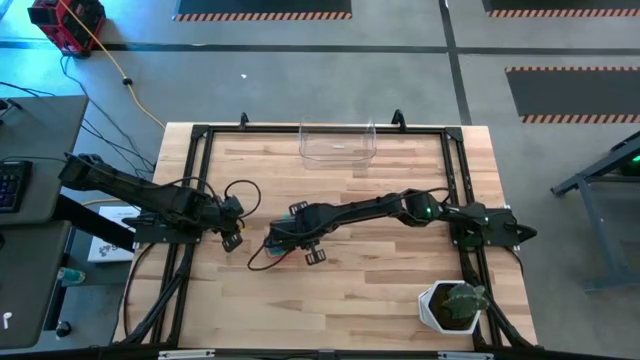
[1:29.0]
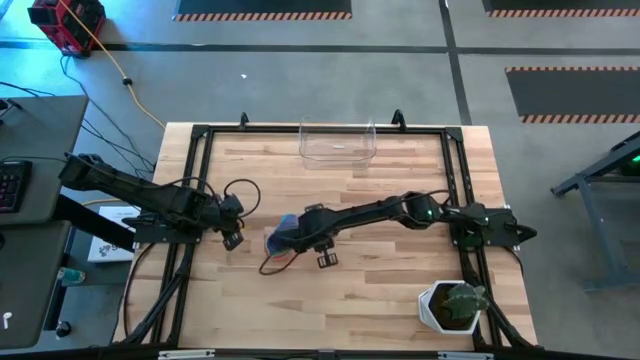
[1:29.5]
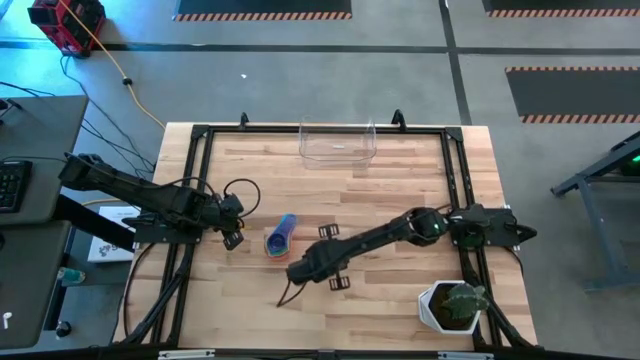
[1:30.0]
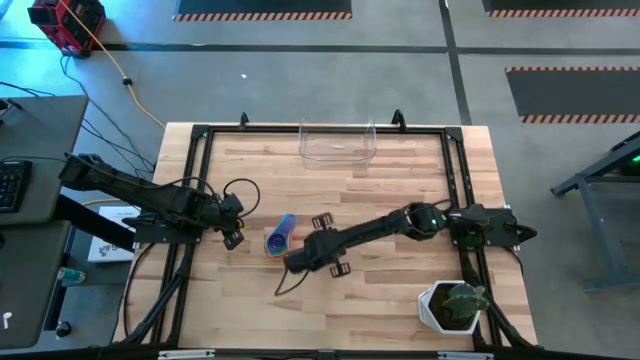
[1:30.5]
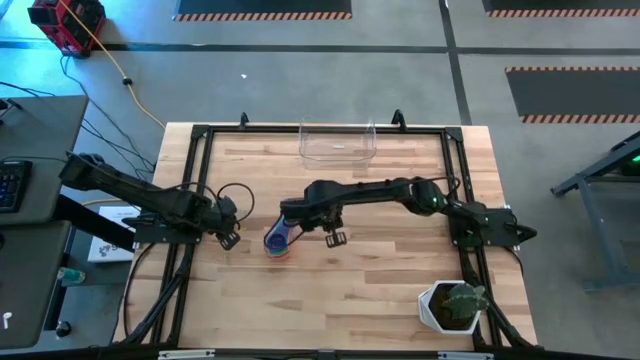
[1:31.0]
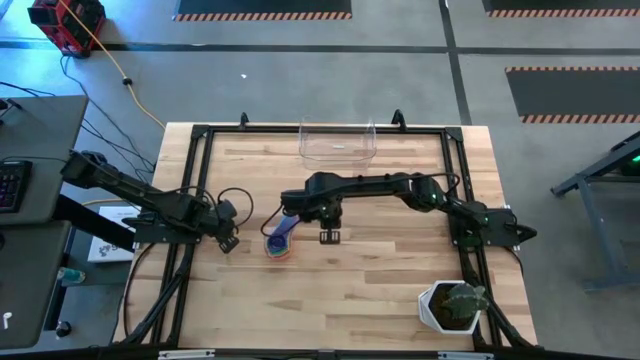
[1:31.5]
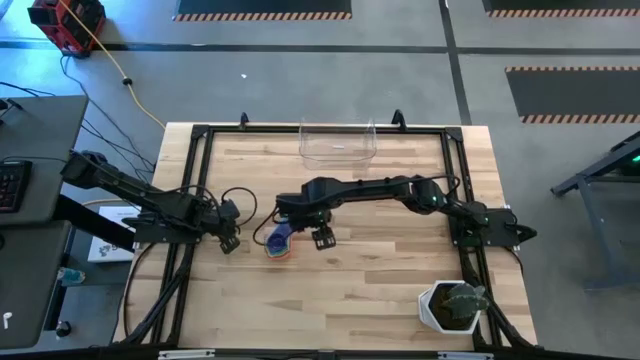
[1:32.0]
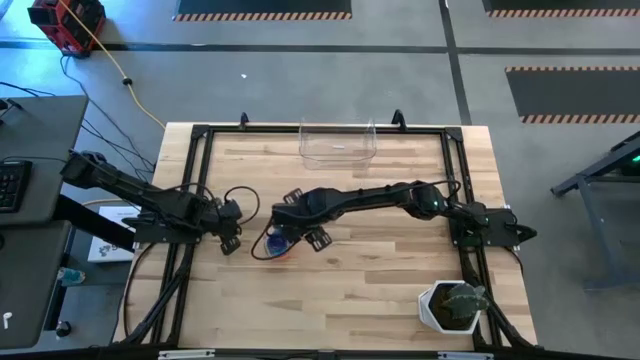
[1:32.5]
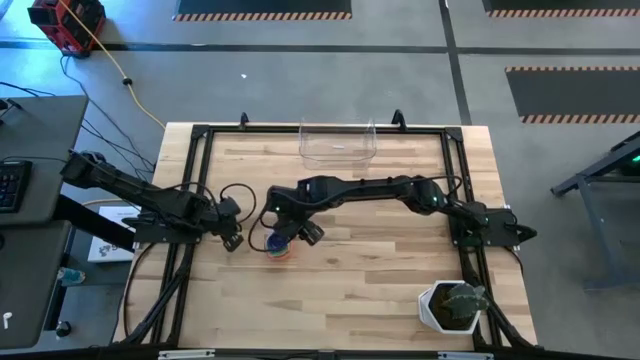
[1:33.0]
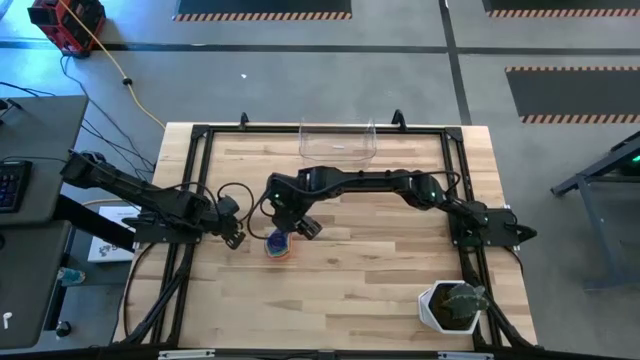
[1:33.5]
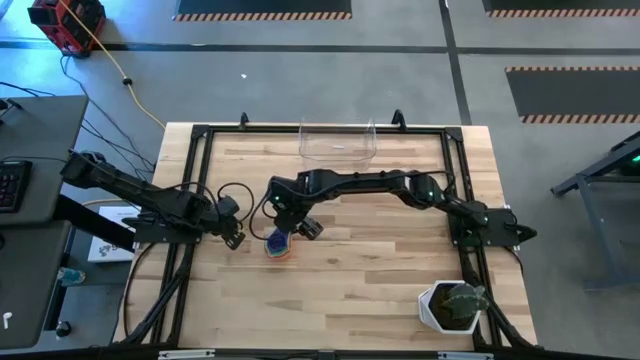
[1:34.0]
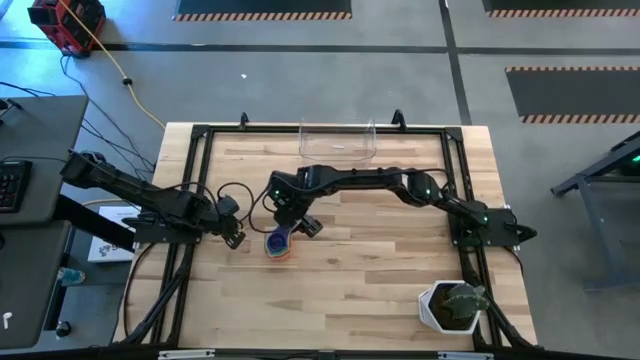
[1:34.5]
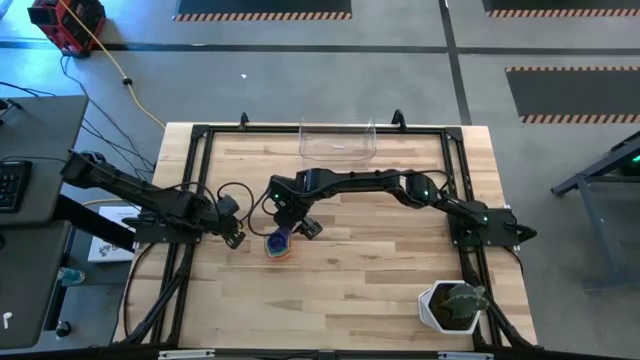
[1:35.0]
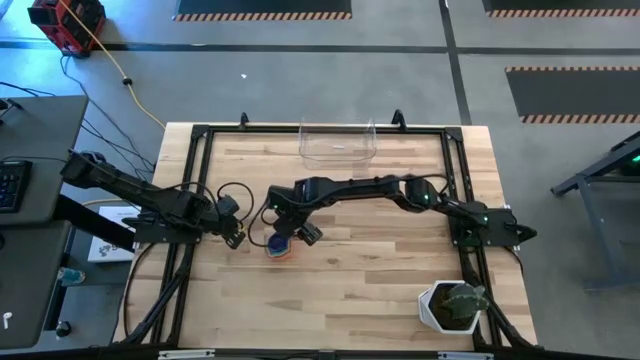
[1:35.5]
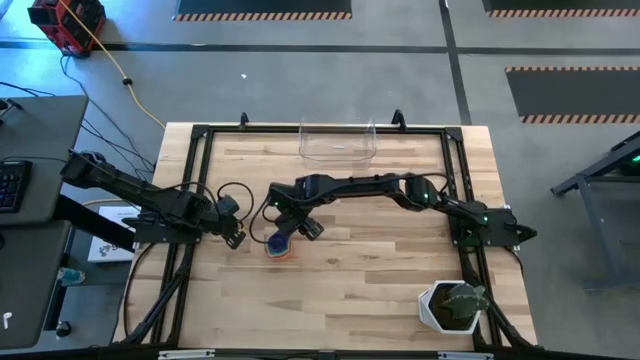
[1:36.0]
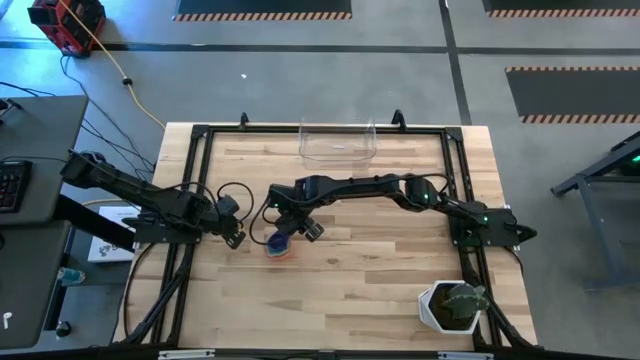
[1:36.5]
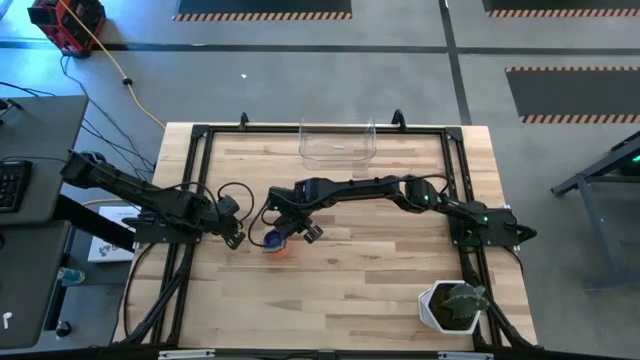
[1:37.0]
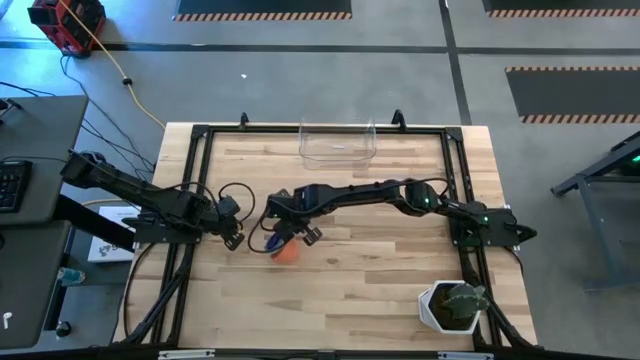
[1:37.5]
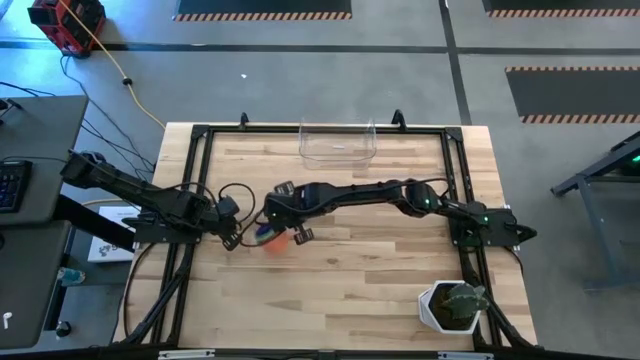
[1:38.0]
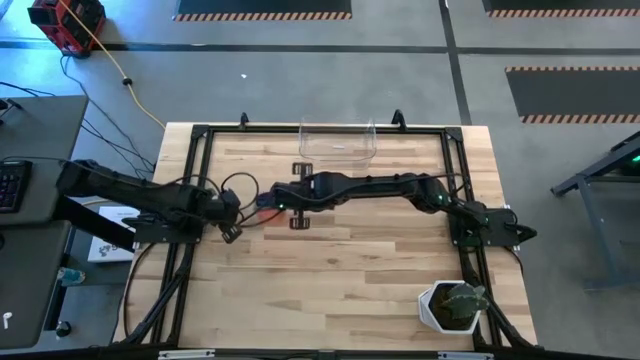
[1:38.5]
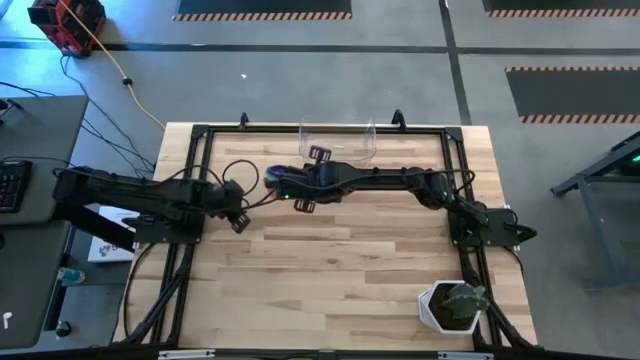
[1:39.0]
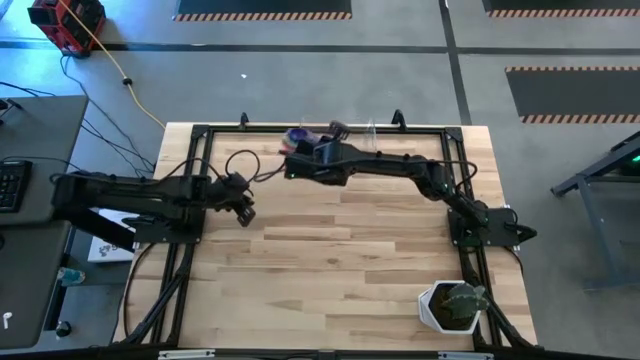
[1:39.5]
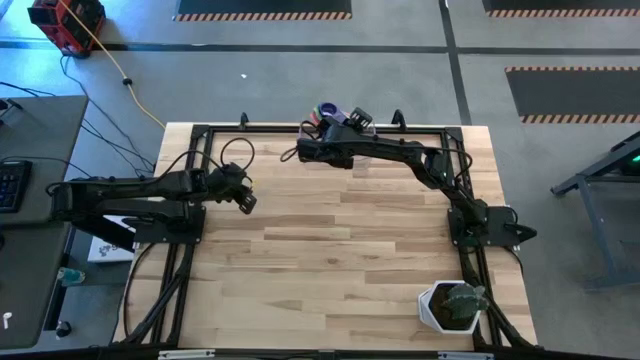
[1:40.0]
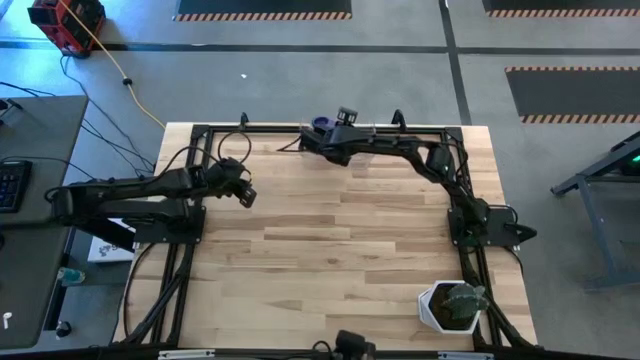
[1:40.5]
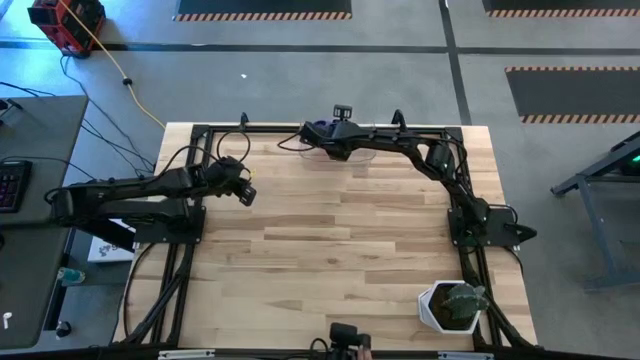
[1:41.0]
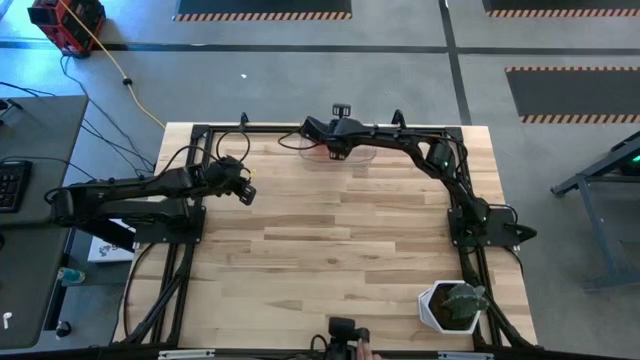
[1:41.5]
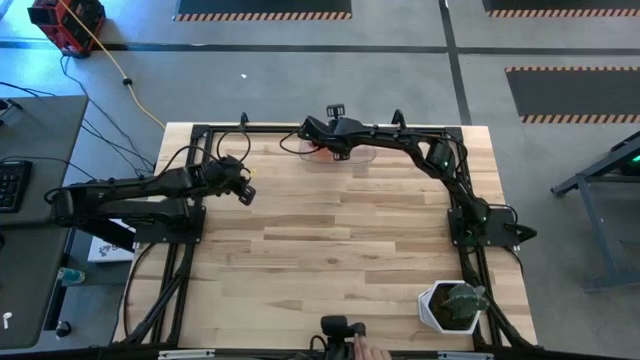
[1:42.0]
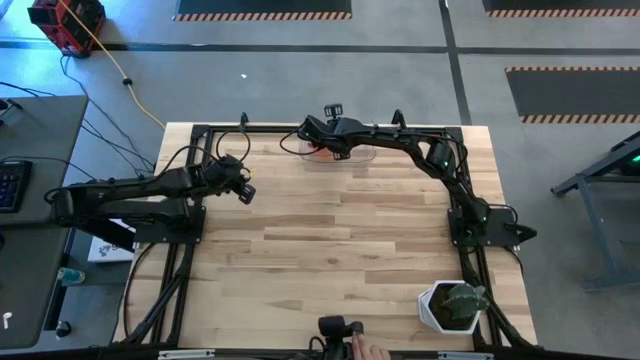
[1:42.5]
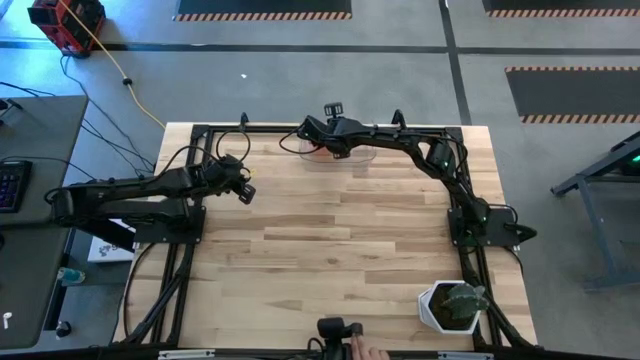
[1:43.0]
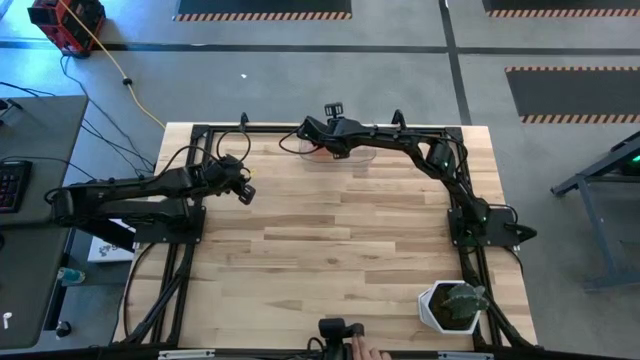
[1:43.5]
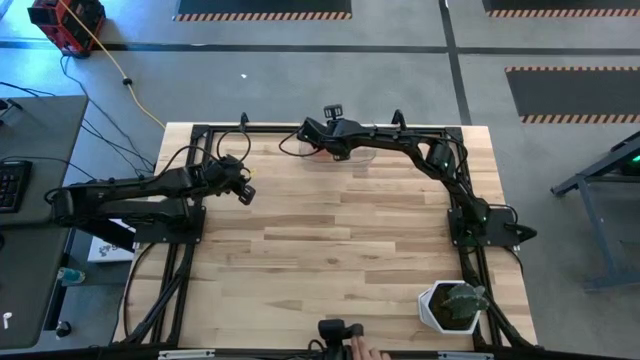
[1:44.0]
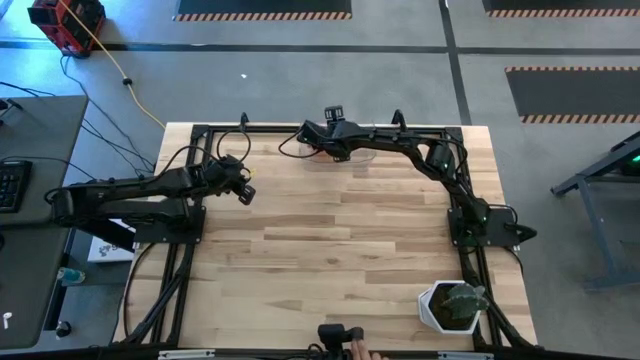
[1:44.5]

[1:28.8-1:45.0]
Task: Nest measuring cups in basket
Put the nested measuring cups into the bin

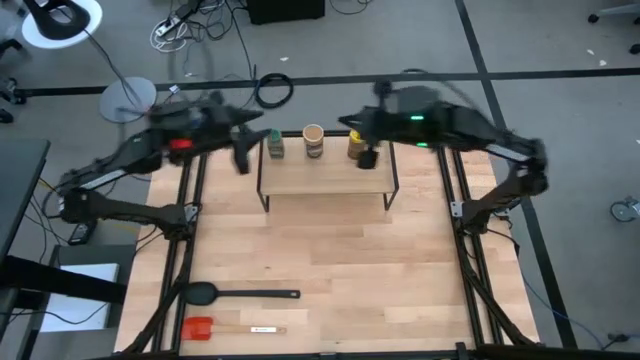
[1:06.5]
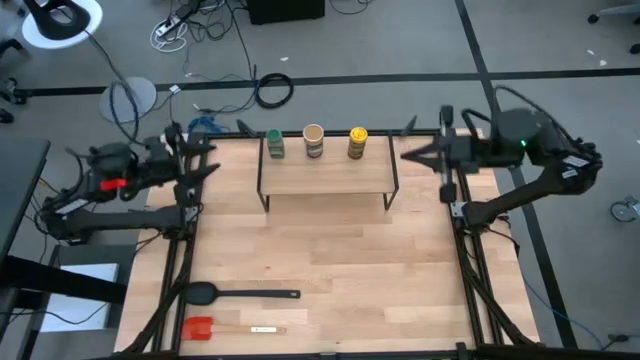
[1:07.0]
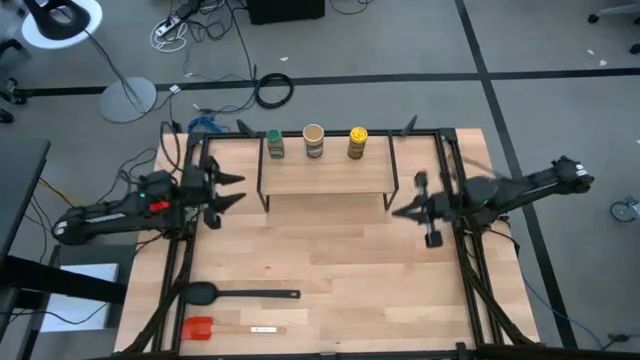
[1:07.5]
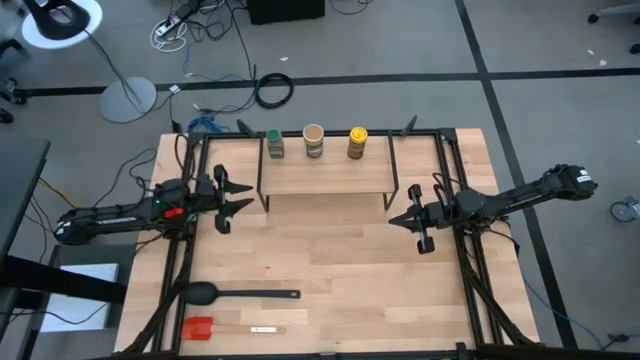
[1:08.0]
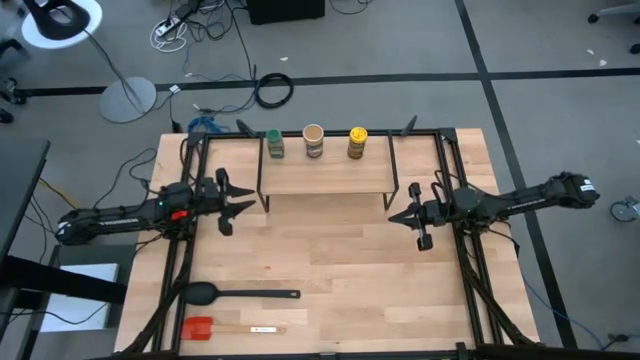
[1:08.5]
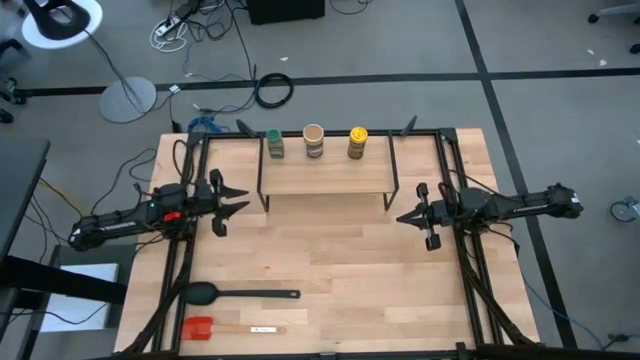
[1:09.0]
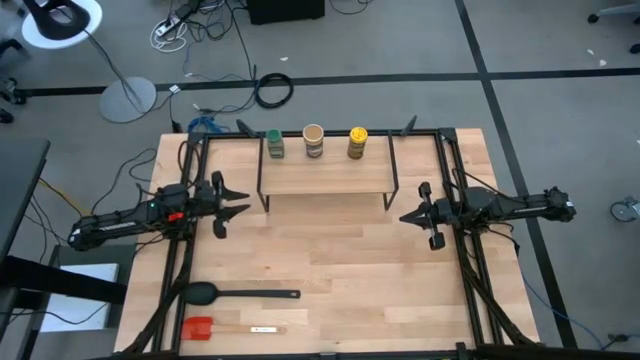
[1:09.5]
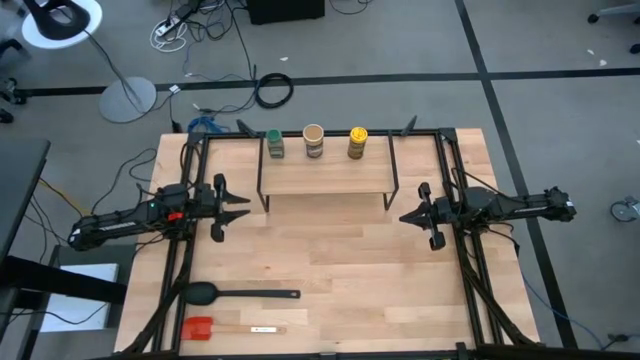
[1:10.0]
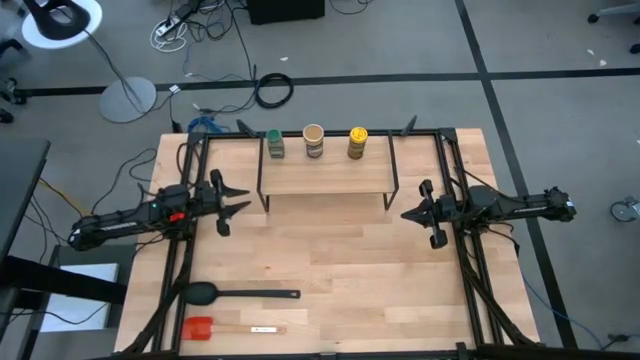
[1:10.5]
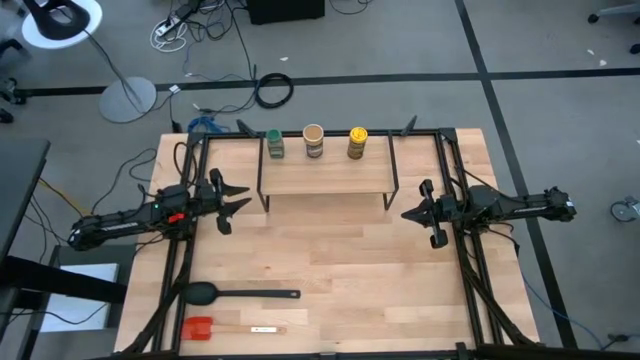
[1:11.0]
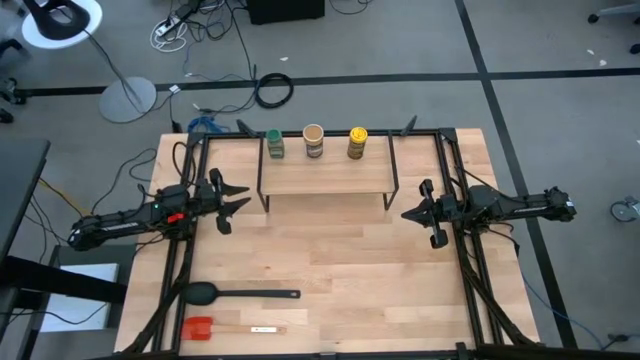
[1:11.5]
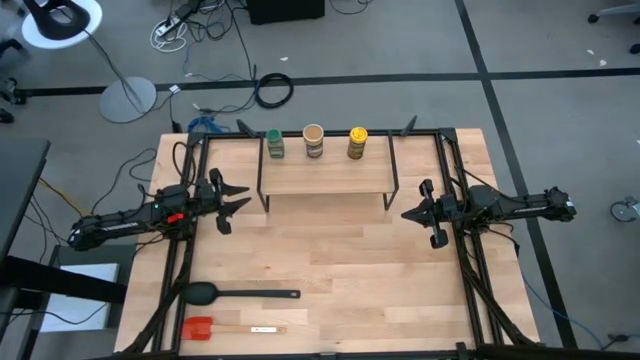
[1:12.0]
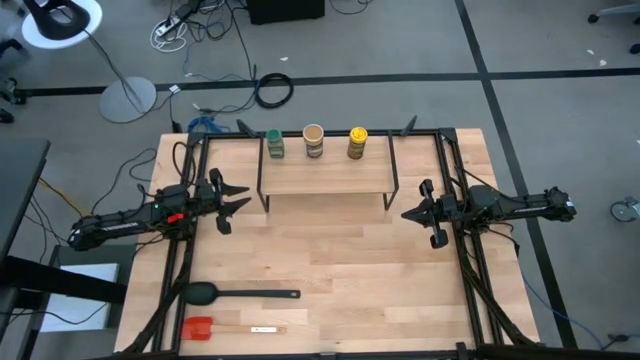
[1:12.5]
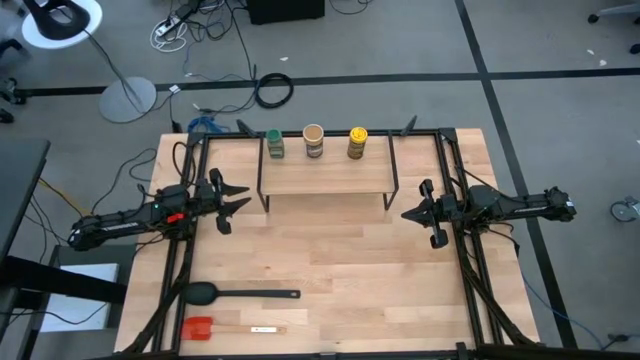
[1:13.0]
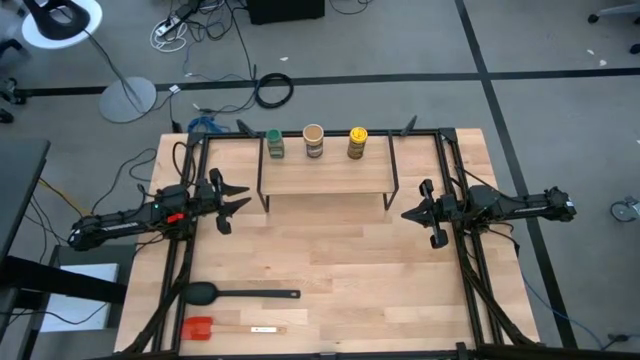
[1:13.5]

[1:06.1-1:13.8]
Task: Shelf spices
Return to Home Position
